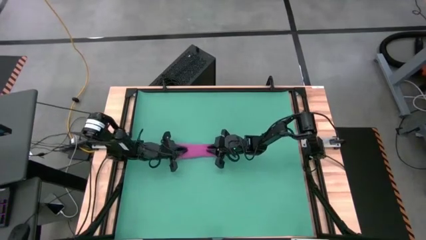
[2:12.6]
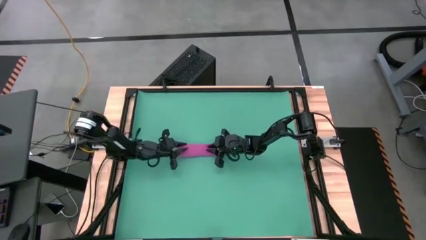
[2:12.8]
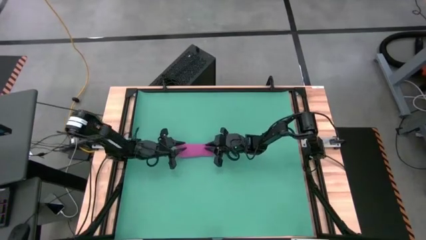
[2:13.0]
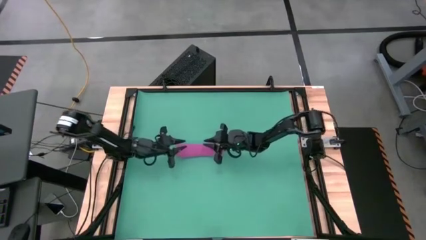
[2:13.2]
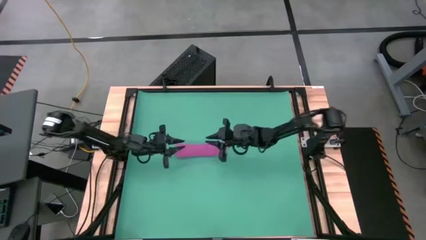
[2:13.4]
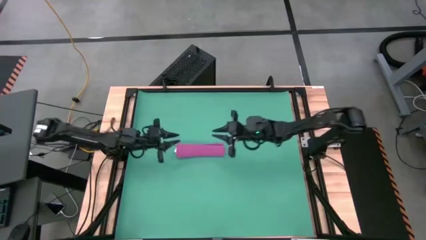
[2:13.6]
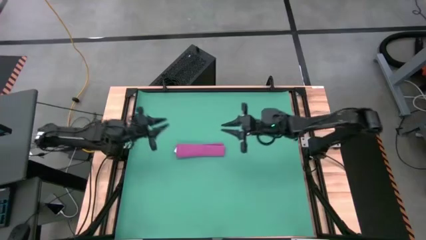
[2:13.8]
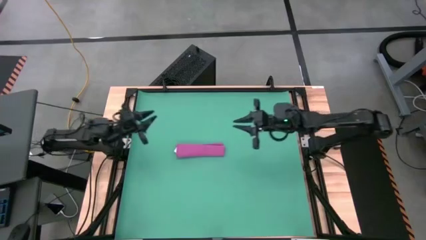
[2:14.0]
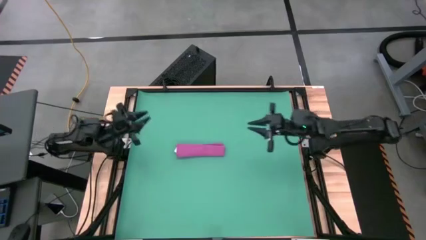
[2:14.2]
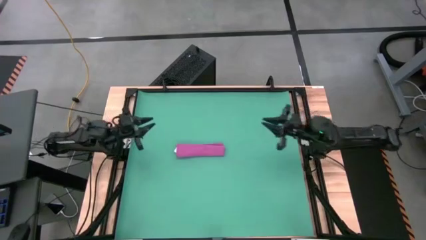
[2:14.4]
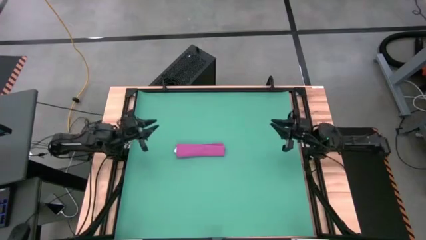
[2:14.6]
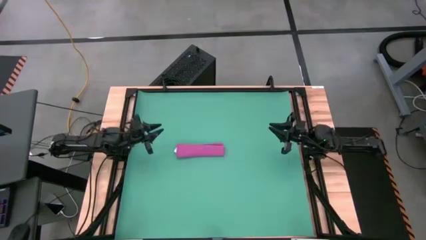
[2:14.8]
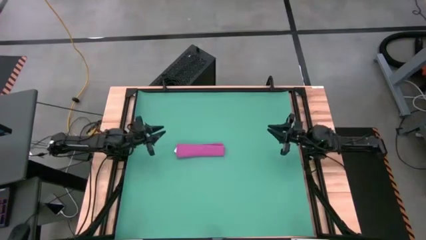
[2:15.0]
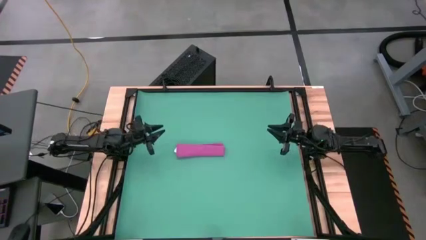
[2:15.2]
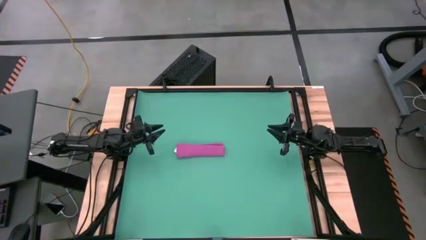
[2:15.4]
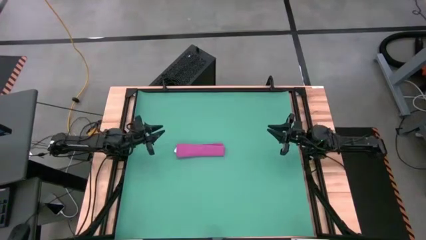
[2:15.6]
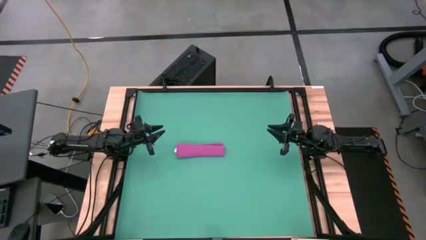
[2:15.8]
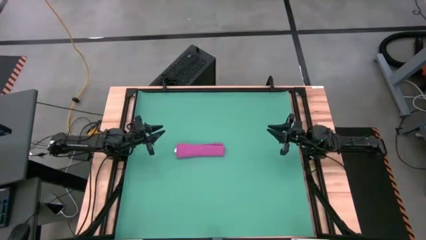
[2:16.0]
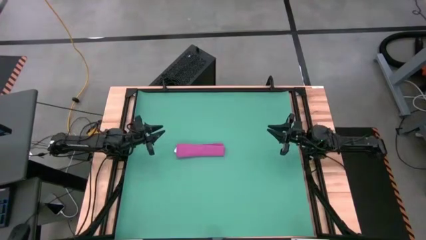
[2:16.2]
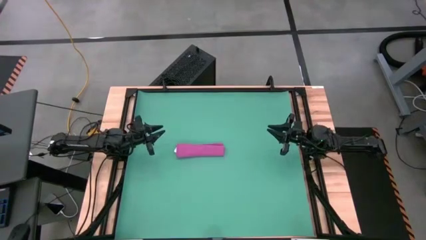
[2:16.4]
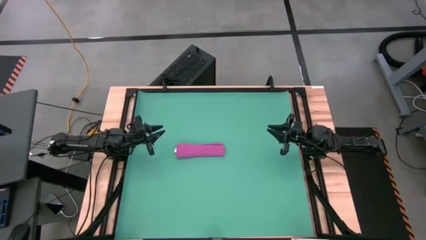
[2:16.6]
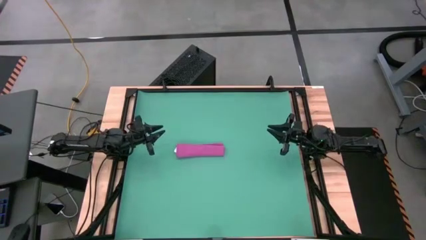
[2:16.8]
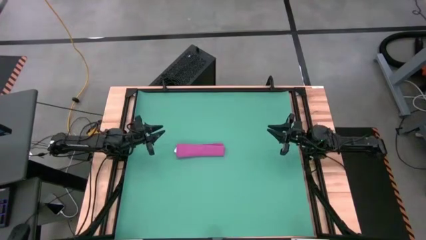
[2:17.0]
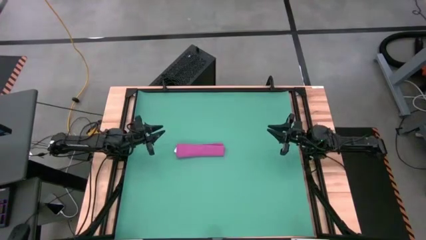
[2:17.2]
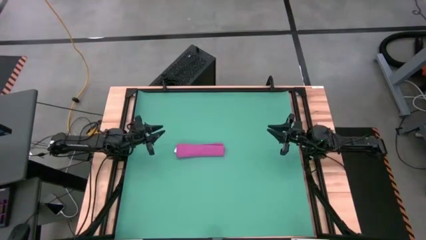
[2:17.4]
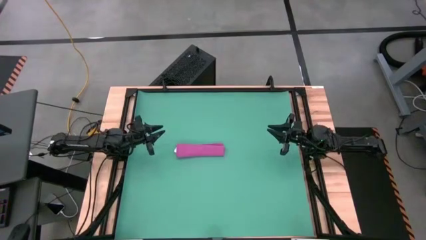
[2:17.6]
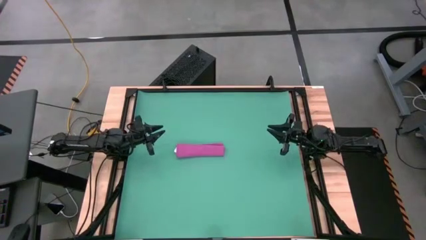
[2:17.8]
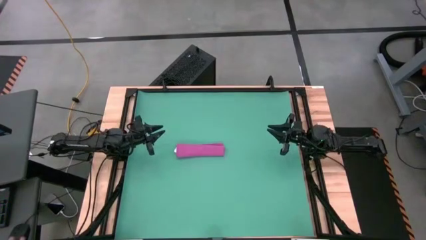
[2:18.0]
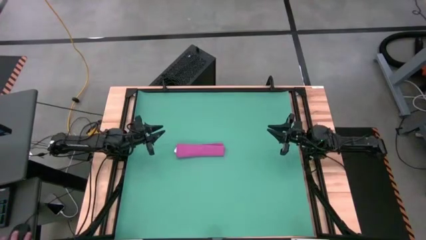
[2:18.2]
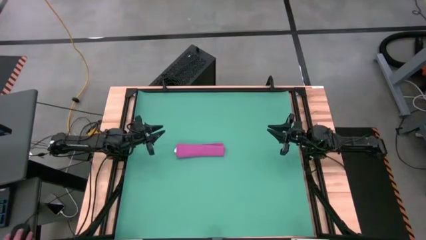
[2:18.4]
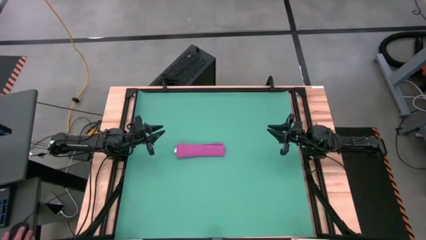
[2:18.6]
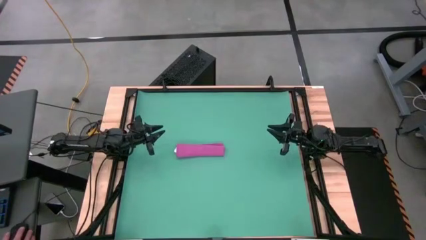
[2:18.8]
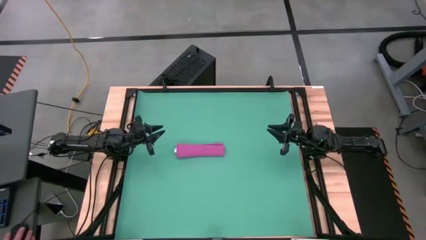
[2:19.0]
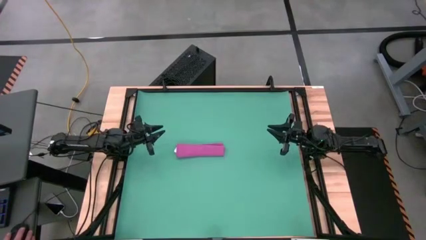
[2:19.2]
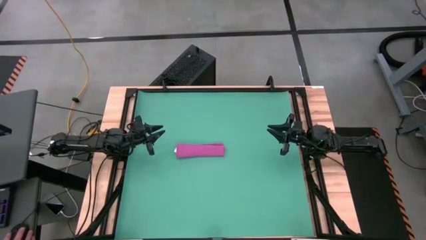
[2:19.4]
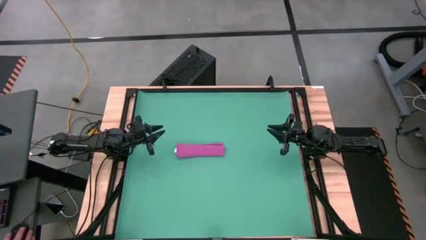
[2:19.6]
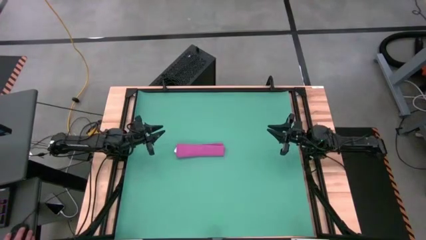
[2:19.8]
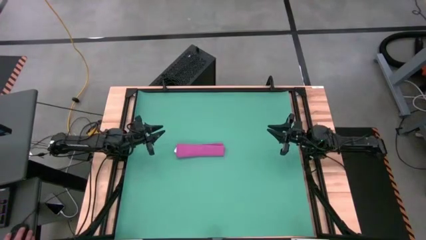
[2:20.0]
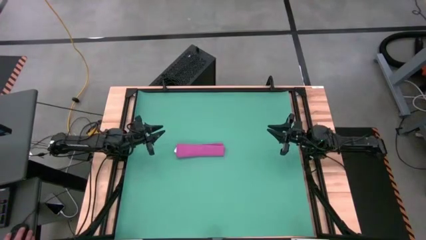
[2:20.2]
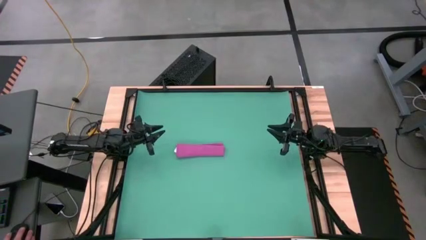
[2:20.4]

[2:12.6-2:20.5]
Task: Roll towel
Return to Home Position

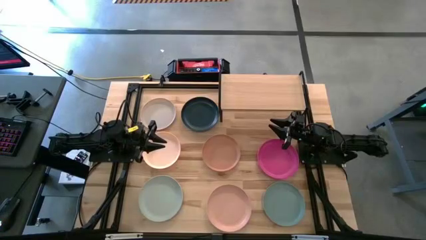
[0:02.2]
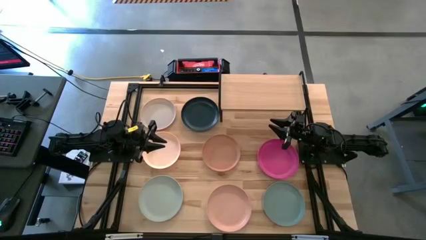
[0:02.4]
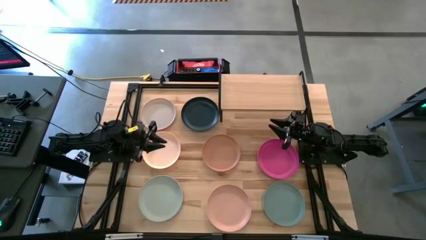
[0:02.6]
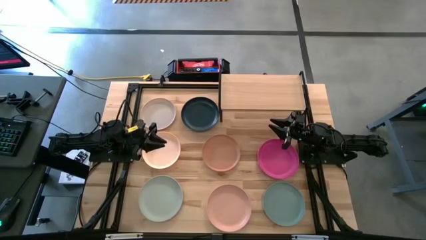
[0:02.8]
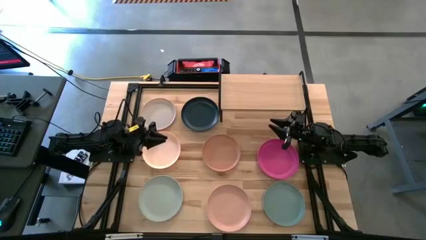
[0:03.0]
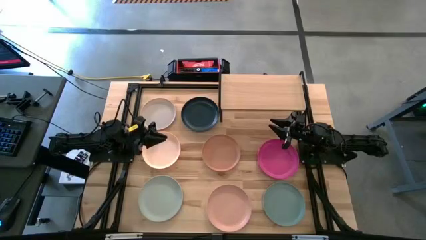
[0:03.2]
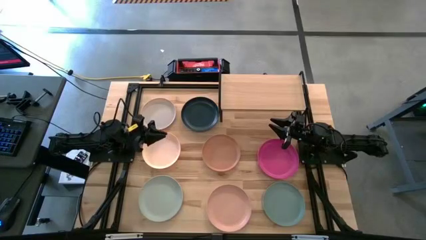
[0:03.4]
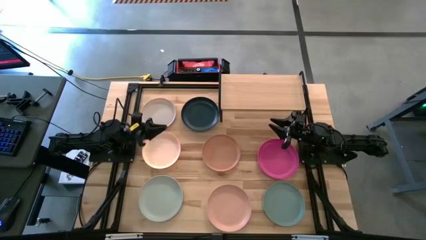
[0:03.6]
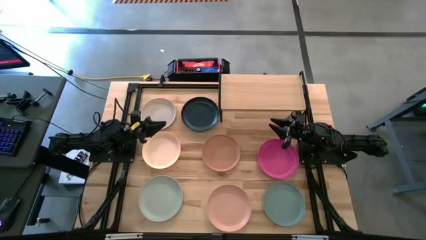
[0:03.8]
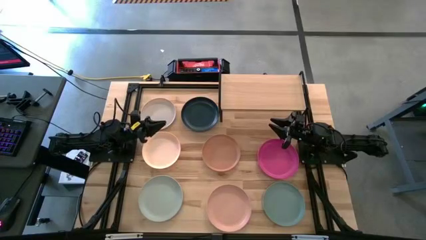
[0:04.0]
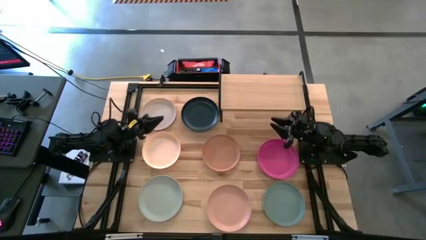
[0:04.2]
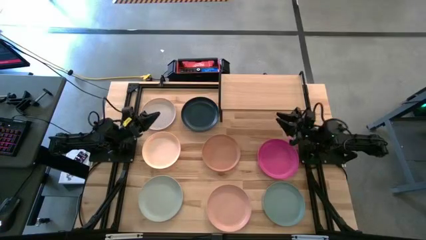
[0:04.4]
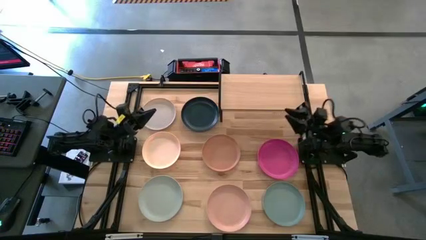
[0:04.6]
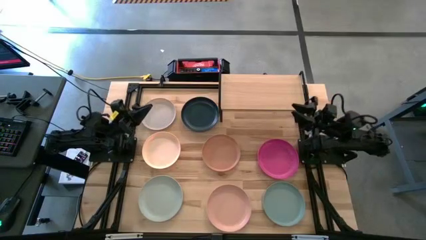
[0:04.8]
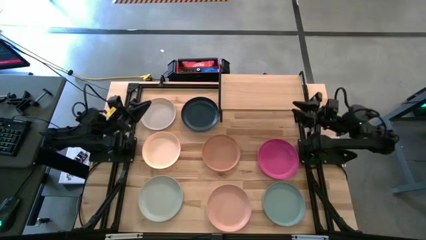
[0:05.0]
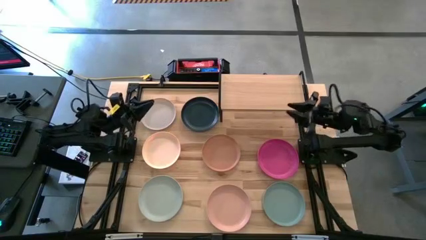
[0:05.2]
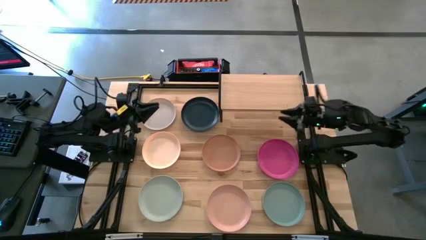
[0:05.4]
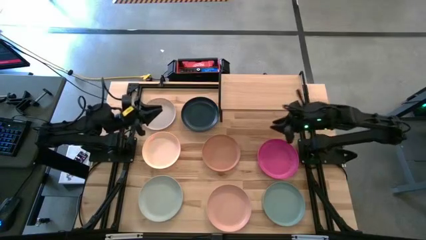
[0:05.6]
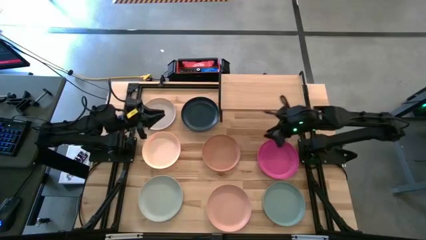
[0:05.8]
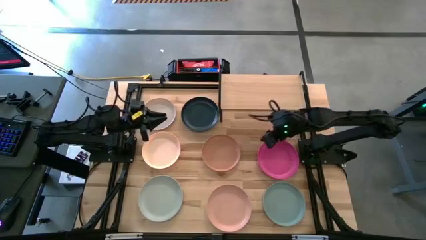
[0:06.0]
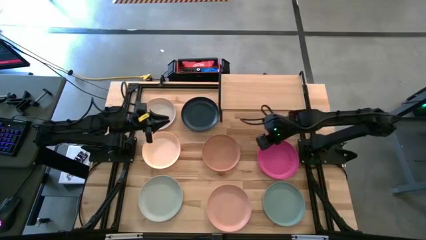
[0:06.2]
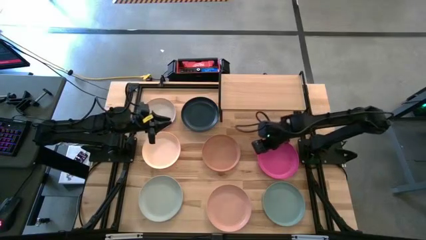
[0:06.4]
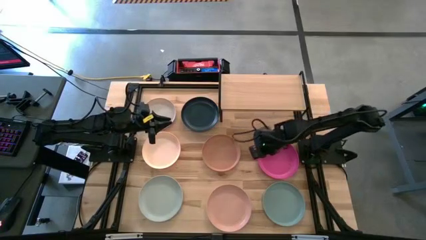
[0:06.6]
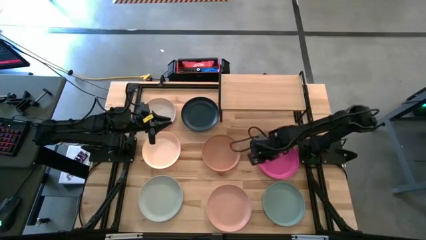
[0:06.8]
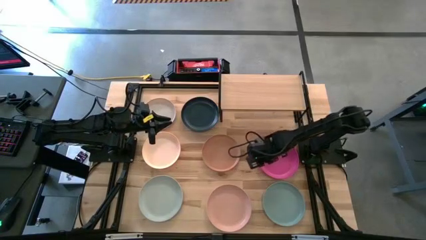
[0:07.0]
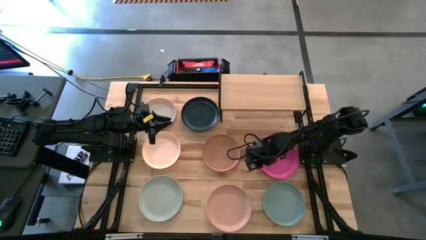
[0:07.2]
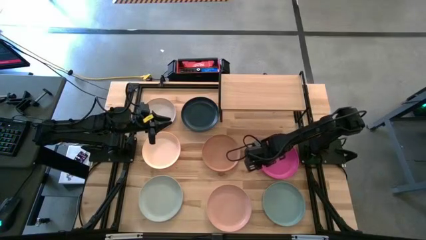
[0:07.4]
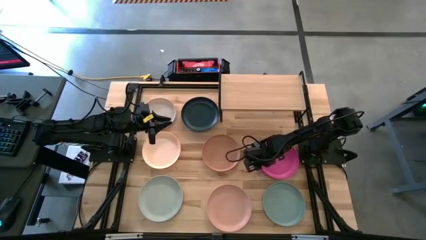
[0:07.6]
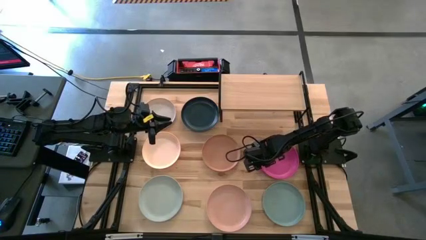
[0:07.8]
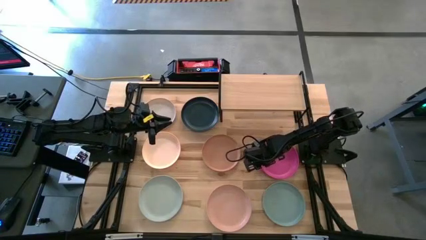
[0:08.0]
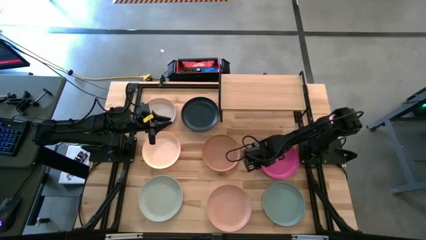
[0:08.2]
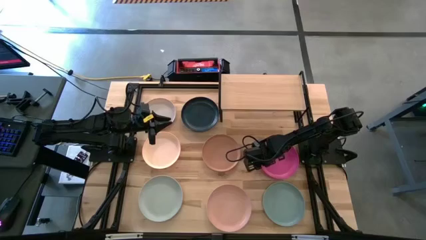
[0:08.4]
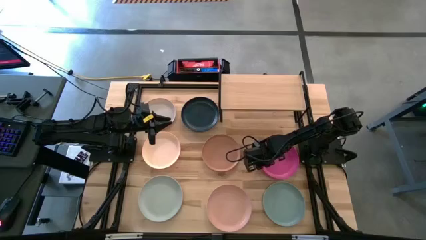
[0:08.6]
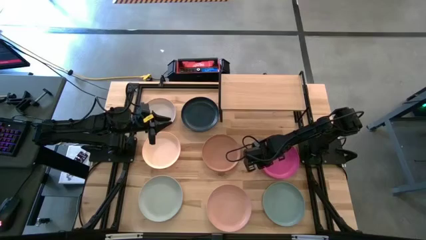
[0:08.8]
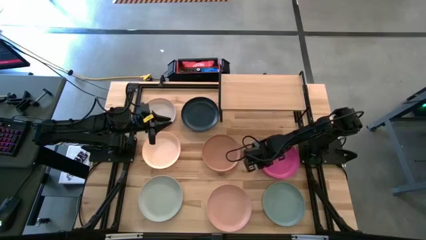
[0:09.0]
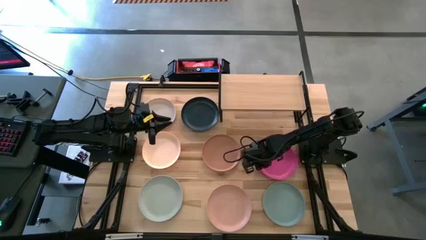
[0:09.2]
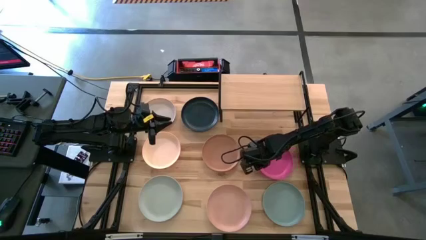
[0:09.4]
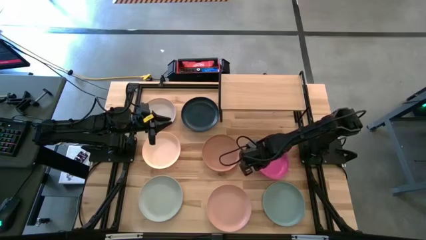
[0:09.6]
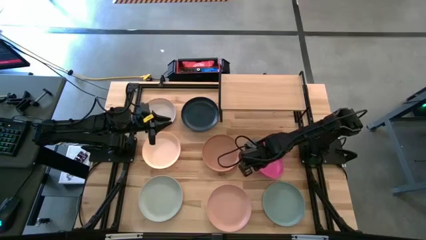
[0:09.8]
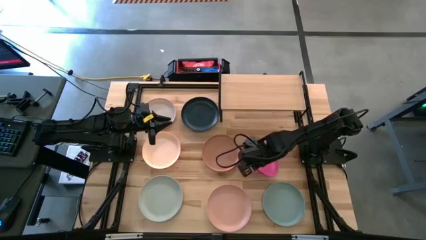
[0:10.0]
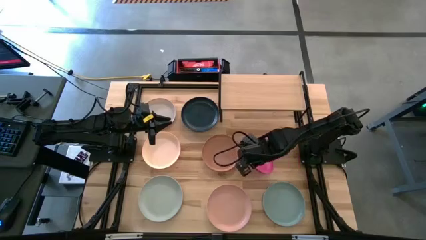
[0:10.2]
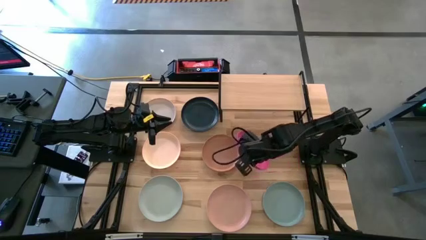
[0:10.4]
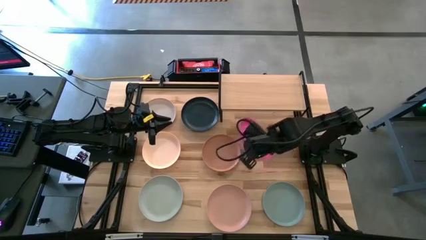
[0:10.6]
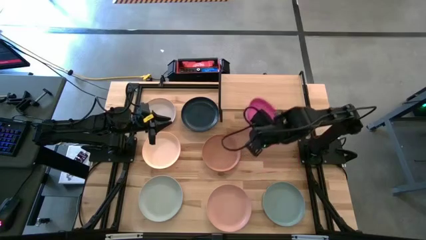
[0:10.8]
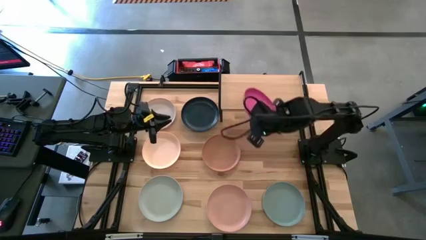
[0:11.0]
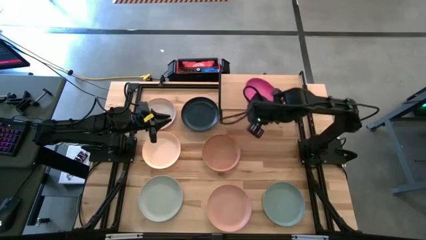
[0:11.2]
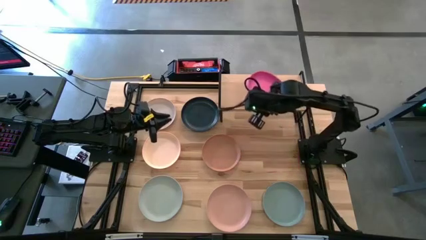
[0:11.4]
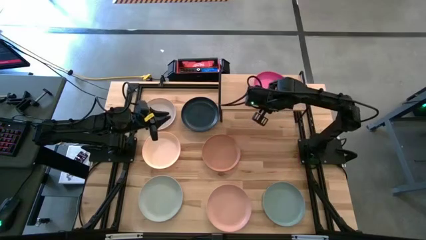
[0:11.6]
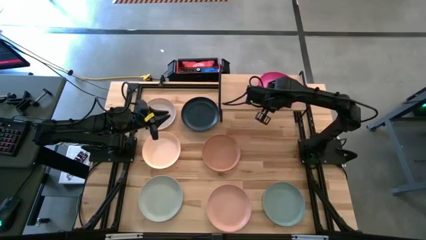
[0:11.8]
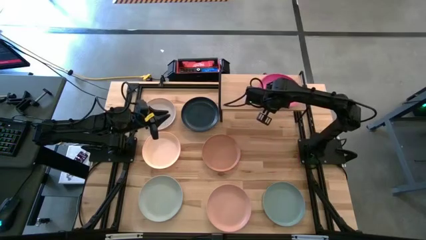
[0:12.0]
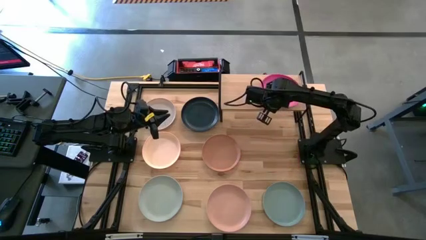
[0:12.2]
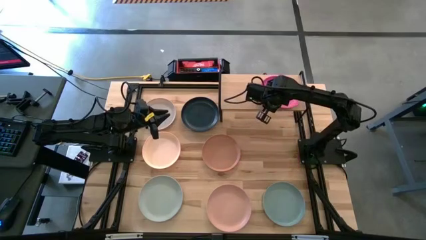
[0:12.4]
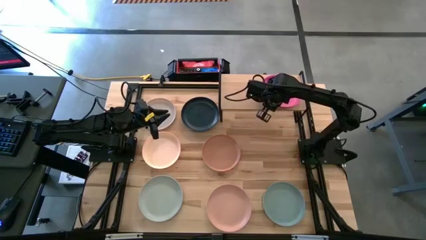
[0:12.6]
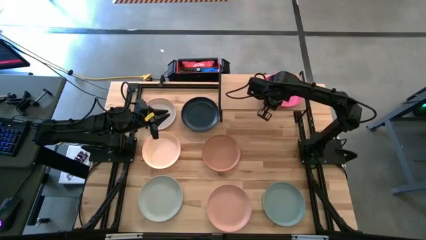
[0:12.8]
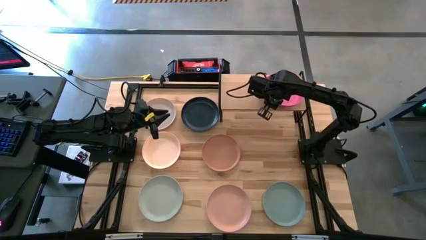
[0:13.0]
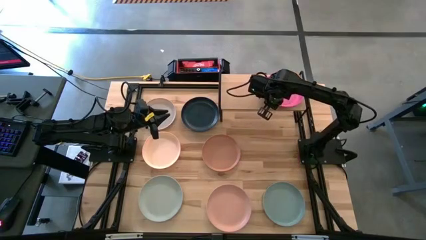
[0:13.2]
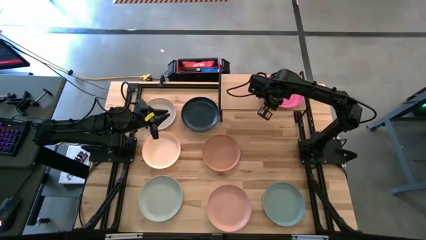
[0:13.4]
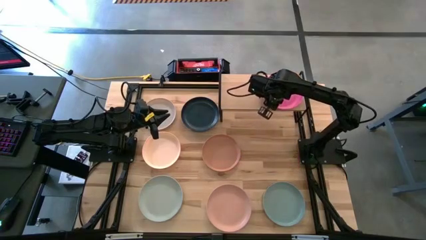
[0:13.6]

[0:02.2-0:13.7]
Task: Place and stack plates onto a shelf
Put the pink plate on the shelf
